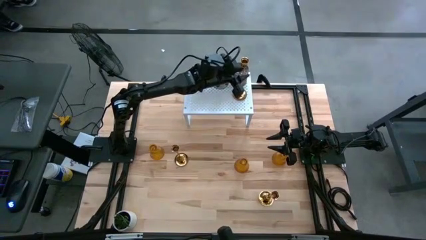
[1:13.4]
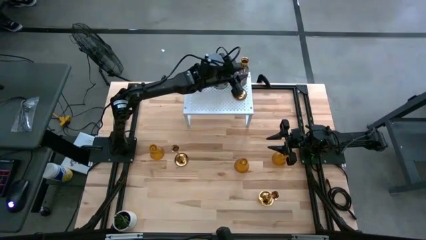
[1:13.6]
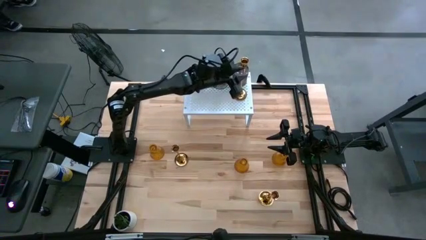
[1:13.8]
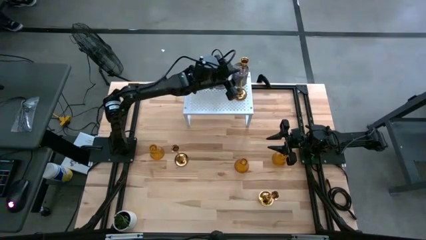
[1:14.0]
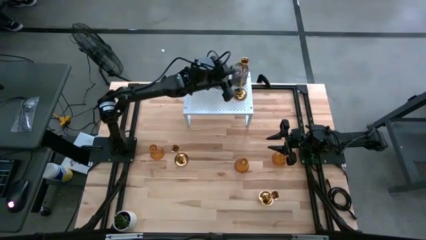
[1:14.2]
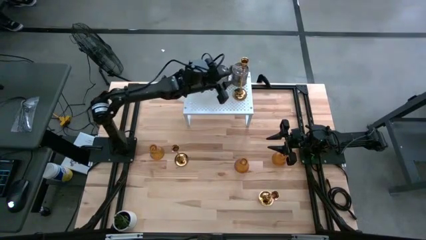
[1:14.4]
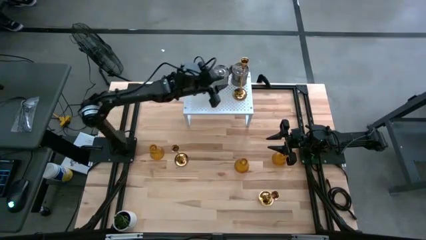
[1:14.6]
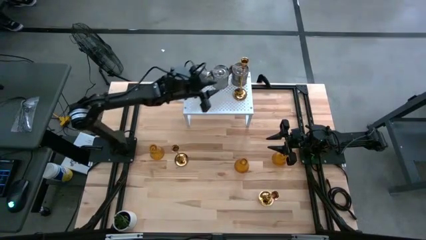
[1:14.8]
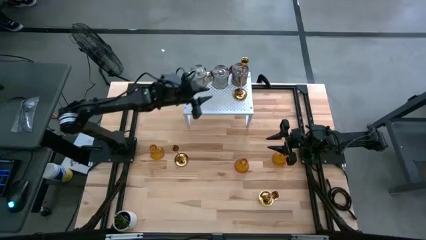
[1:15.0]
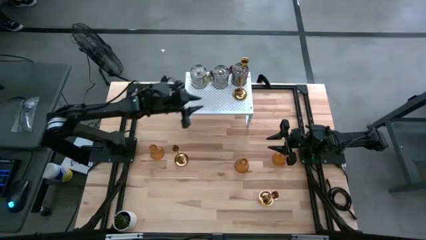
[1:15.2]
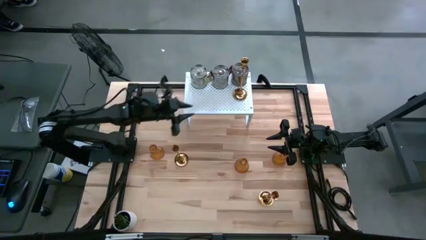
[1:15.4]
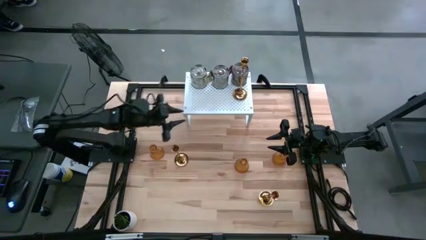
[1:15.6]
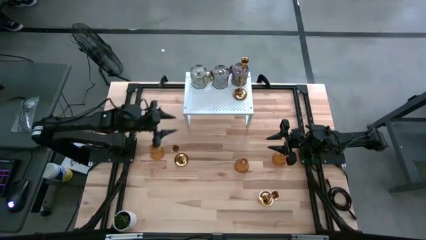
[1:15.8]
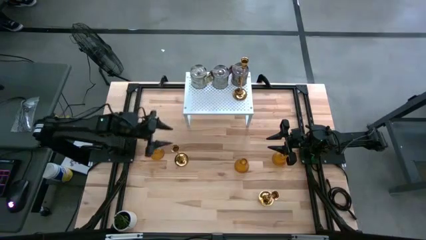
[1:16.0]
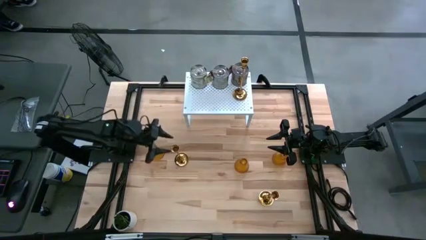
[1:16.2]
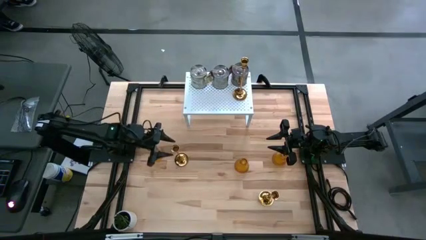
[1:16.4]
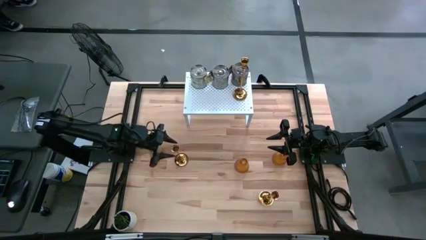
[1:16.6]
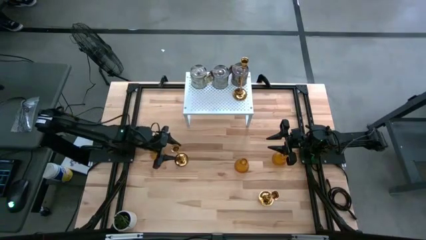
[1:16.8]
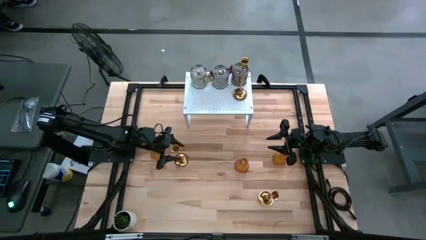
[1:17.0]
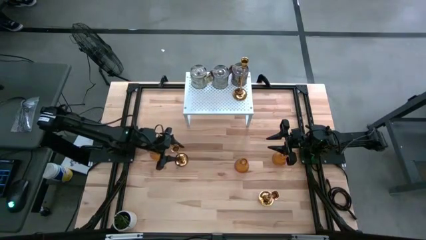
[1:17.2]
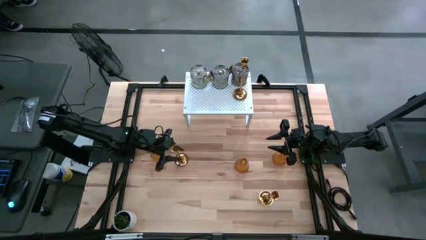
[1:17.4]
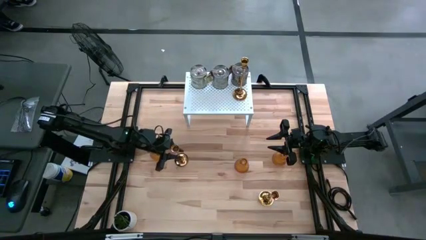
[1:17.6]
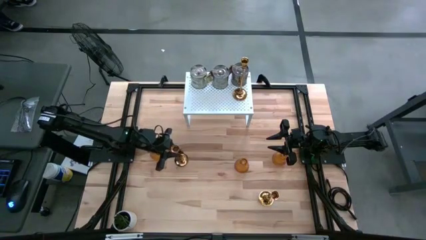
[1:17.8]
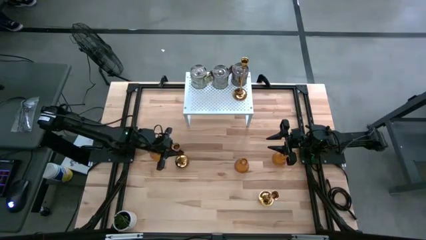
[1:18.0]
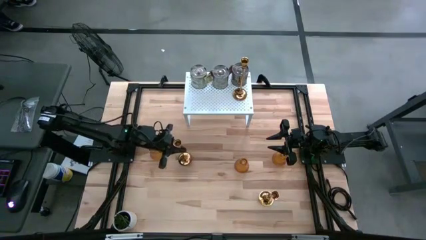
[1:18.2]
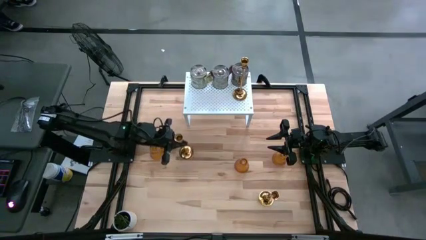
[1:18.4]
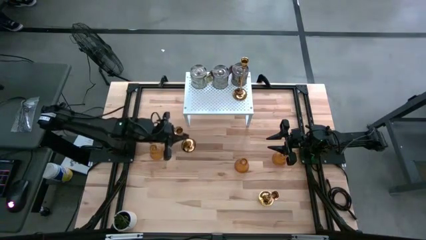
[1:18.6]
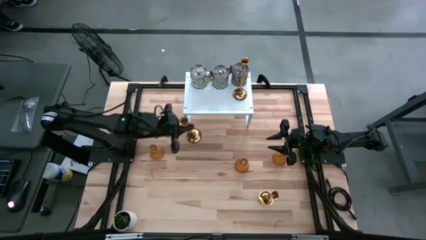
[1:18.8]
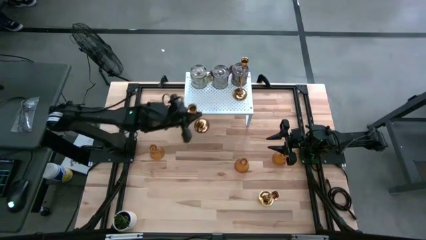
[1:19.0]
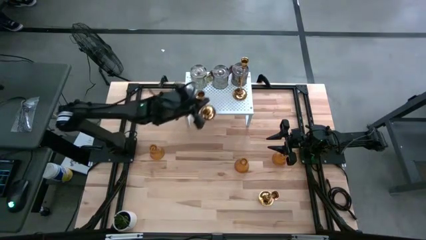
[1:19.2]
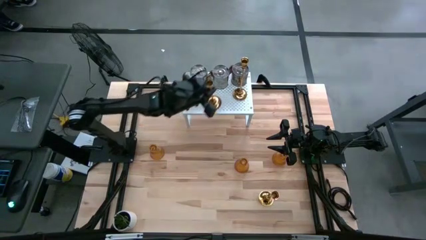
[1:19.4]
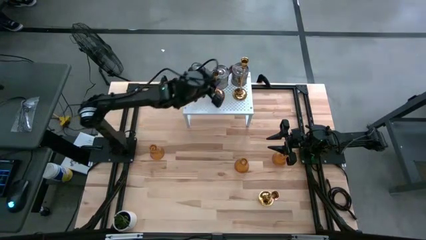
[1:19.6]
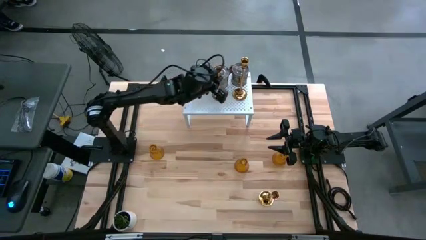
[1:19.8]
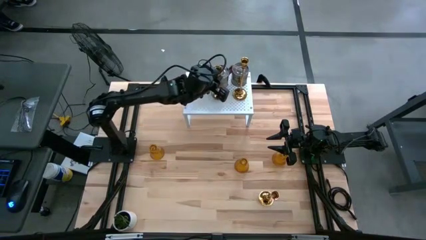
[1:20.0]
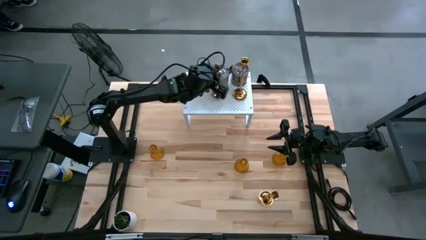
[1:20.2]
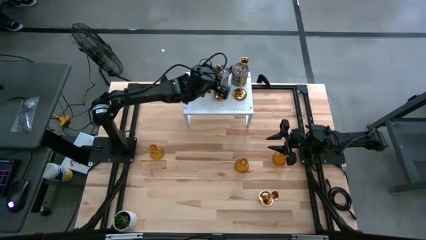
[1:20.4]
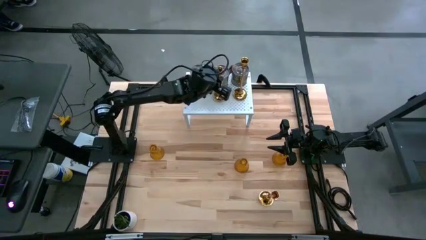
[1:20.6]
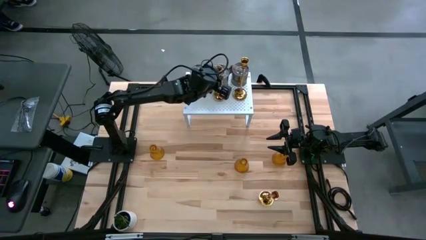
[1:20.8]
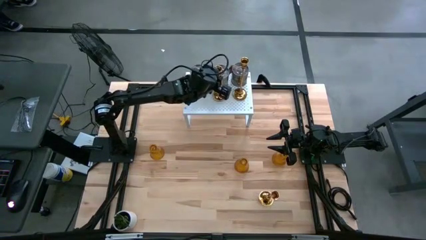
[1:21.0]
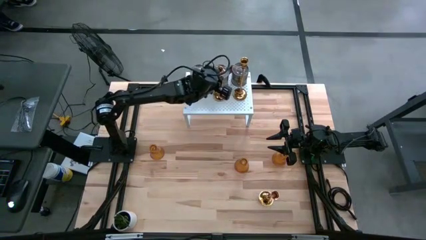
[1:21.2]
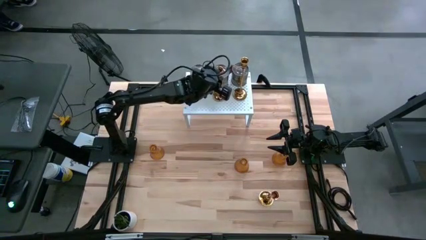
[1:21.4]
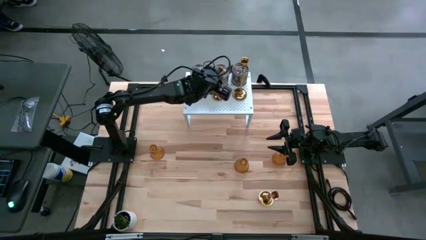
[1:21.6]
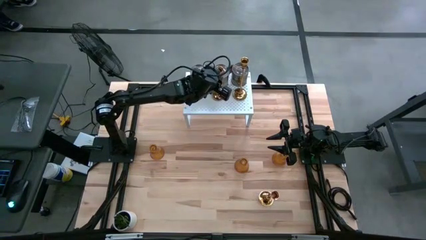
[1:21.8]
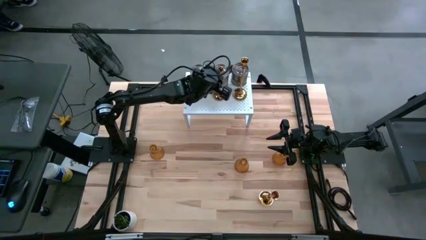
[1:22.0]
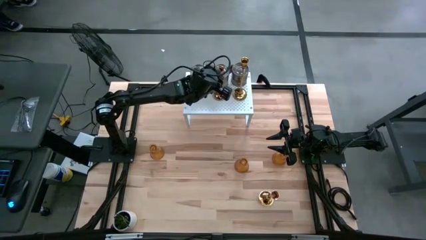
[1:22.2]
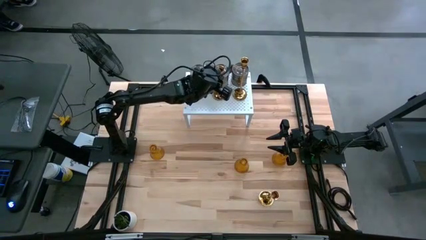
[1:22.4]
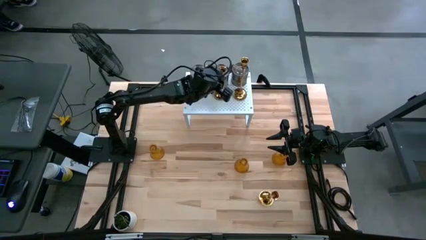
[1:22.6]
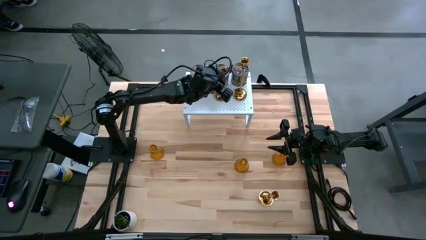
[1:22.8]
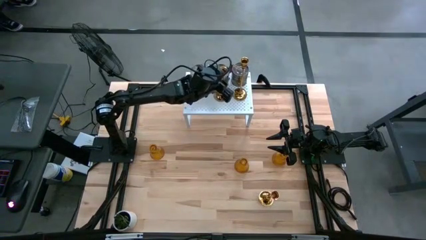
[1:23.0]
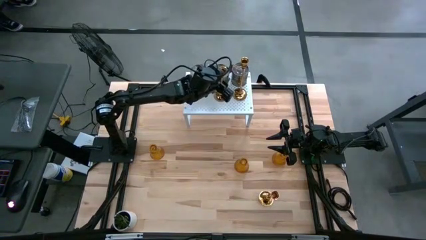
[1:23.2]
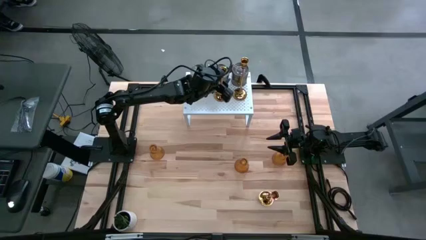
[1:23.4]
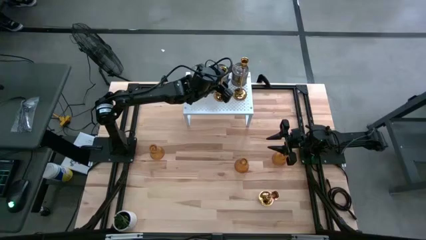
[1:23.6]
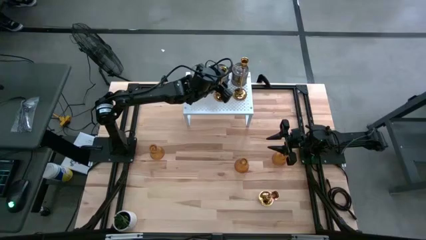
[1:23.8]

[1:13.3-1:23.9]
Task: Pick & Place candle stick holders
Put the top gold candle stick holder aligned with the other gold candle stick holder on the shelf

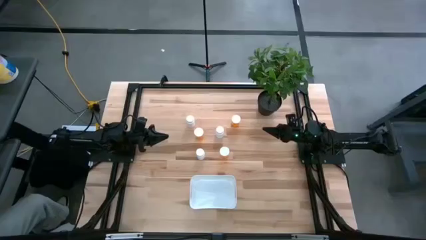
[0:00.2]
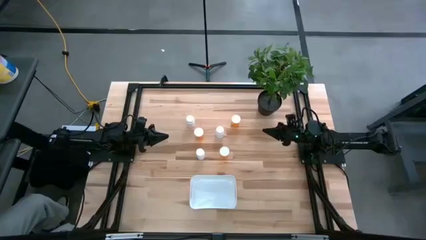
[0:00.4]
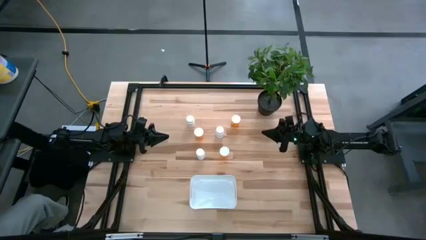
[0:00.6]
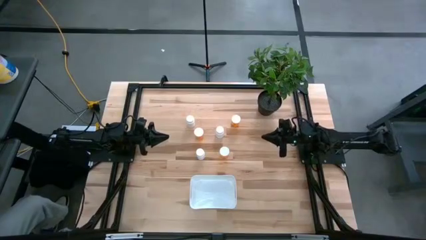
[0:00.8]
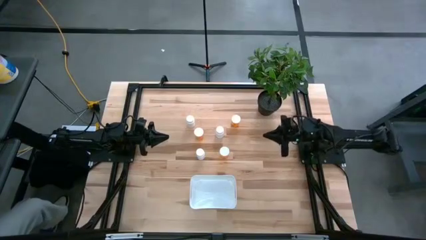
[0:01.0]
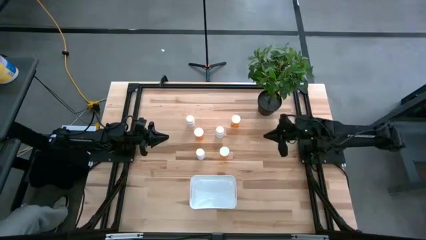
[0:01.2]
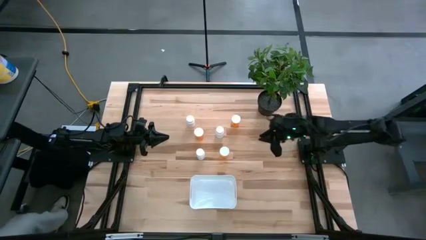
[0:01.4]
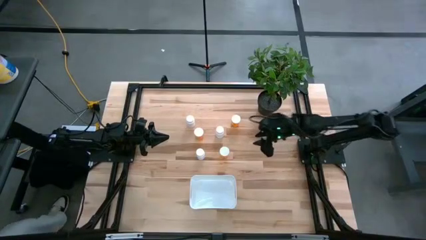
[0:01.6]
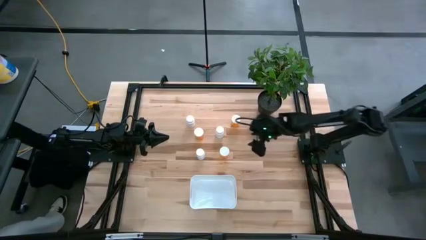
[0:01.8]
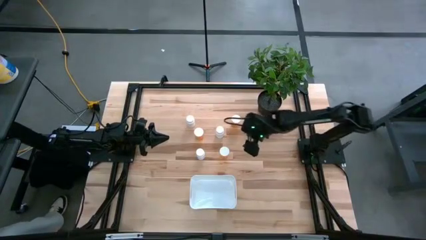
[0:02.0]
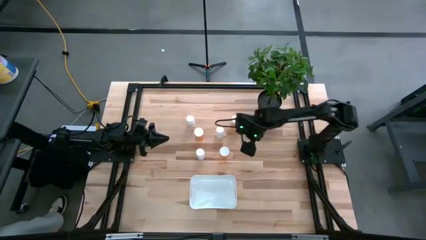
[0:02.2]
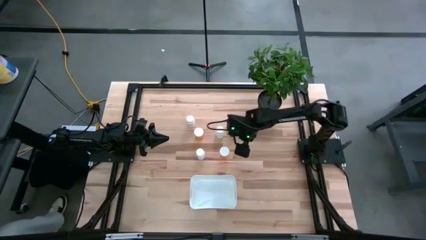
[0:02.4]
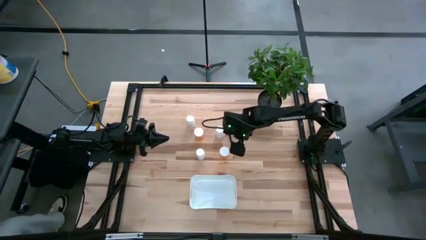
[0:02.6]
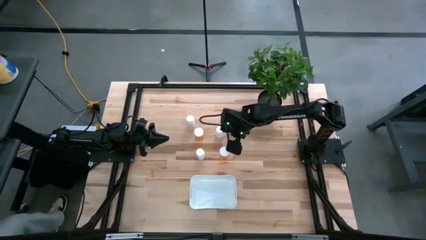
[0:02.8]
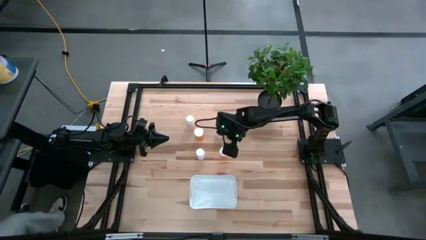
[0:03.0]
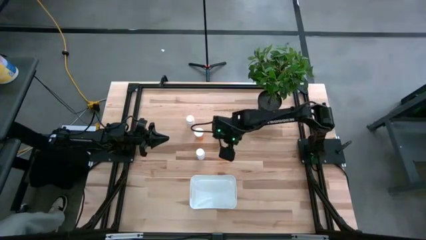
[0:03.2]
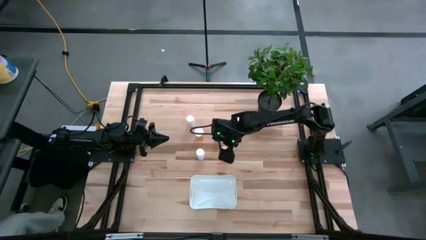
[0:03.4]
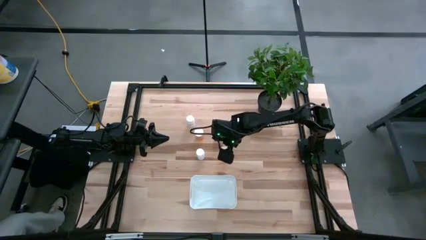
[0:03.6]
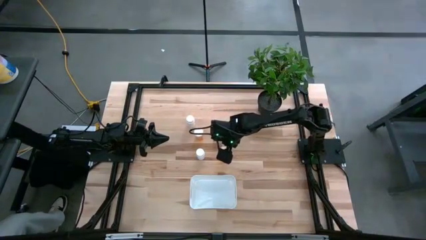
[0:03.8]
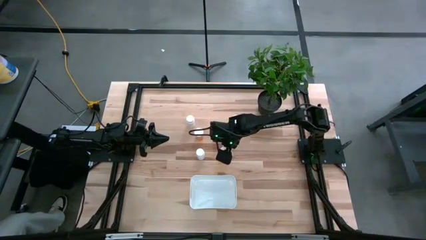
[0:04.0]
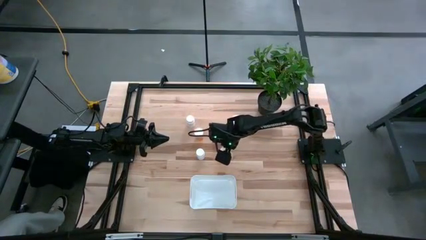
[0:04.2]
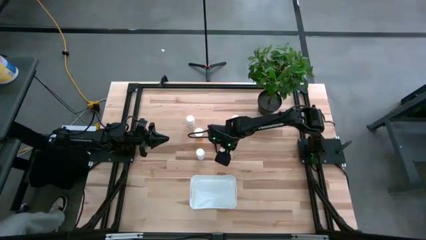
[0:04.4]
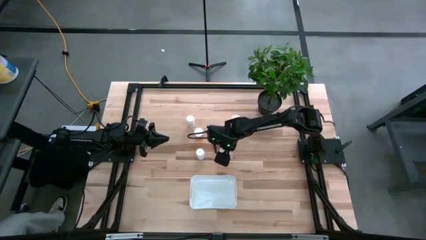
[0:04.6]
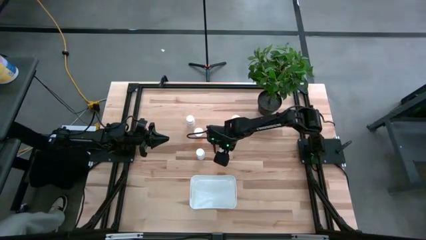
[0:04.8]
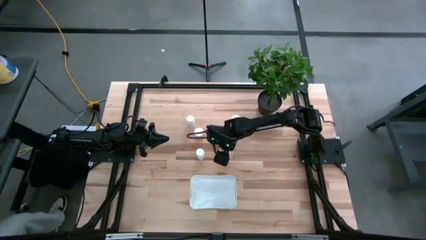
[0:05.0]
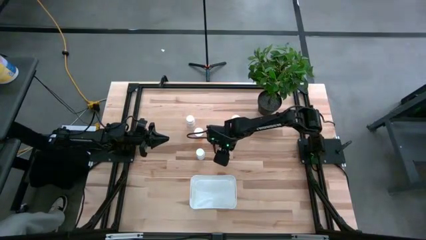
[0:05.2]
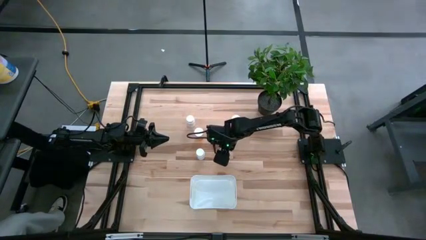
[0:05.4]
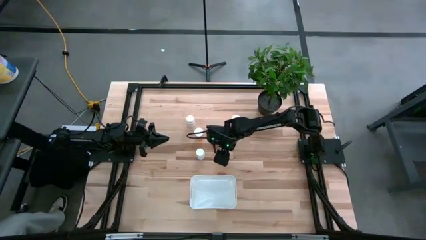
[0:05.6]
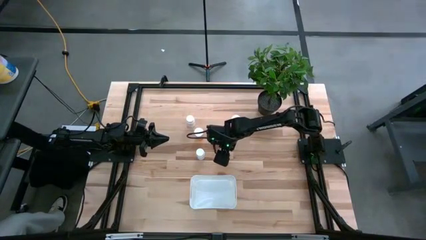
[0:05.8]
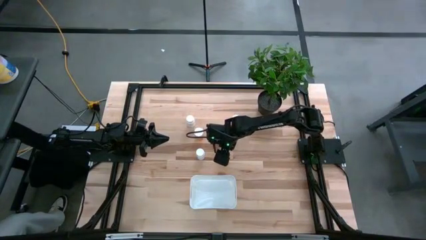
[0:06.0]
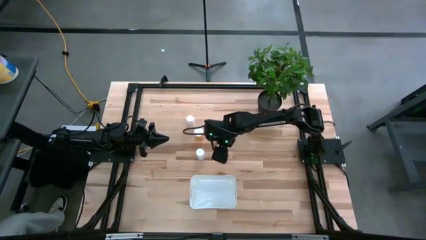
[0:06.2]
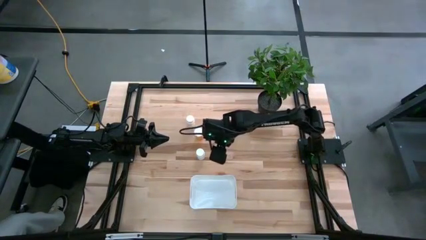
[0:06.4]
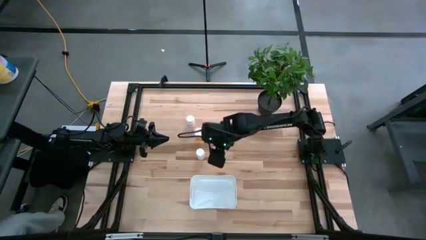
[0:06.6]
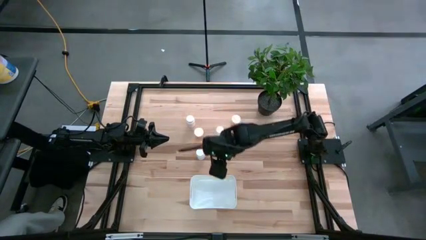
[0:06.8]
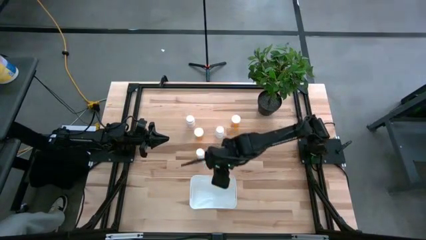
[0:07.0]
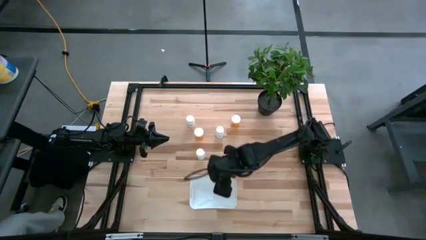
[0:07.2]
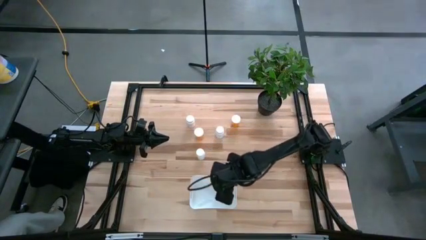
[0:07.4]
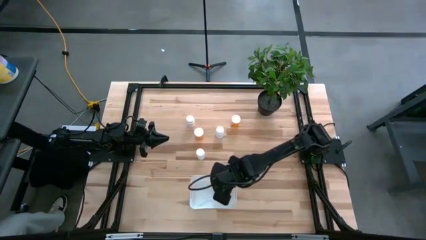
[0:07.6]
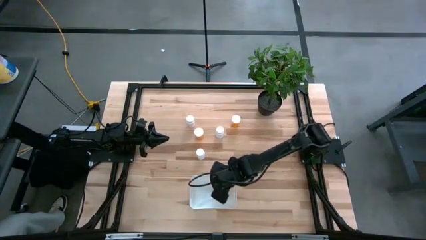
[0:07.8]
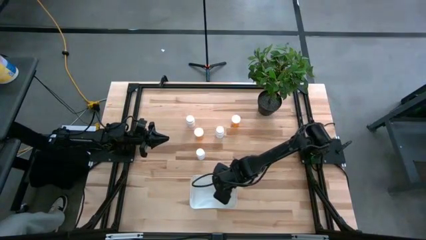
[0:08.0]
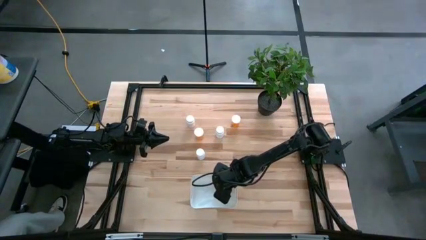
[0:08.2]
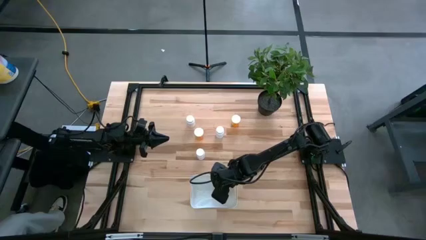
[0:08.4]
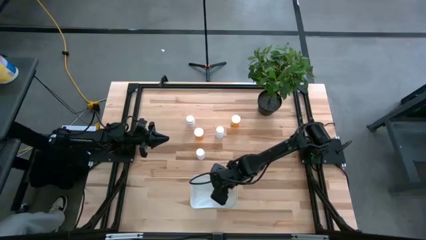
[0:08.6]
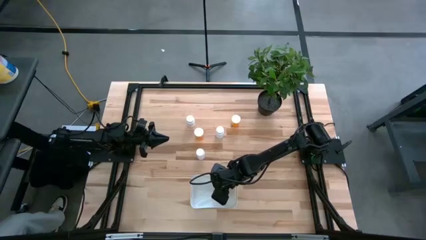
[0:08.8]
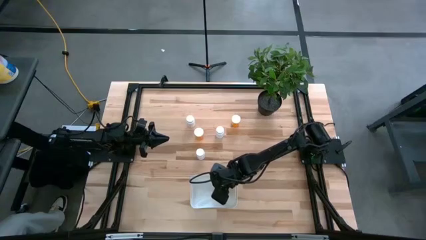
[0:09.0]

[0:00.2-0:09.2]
Task: Pick and place pill bottles into a basket
Put the bottom orange medicine bottle into the container
